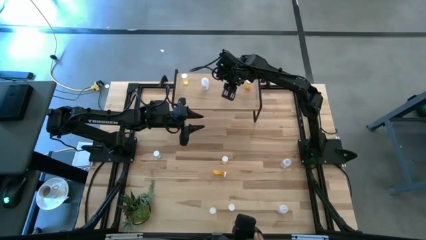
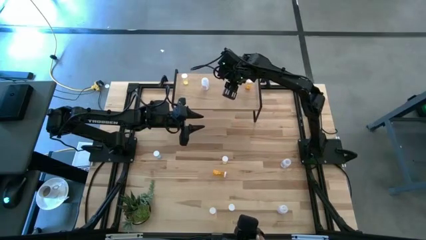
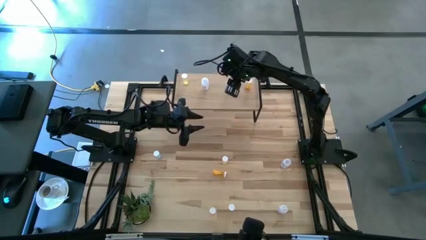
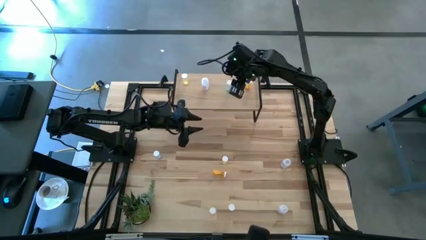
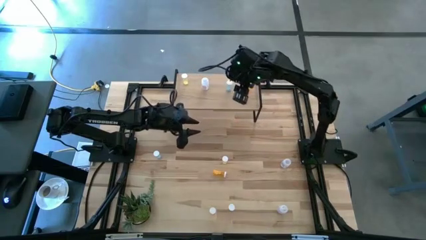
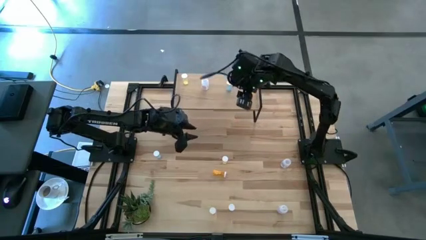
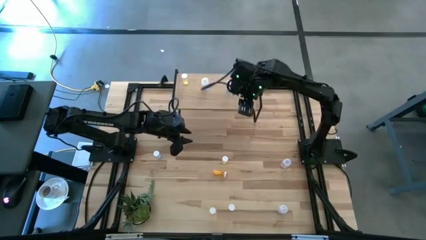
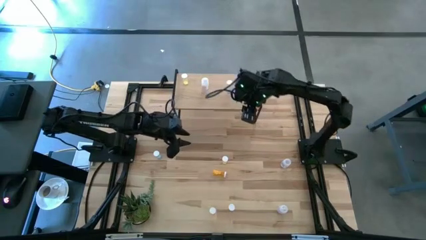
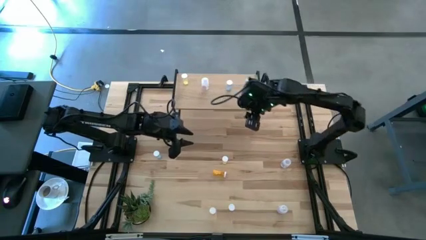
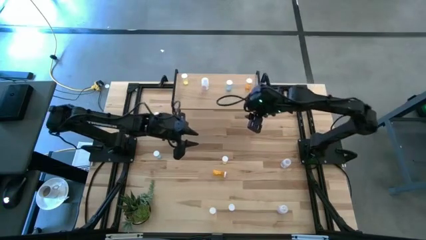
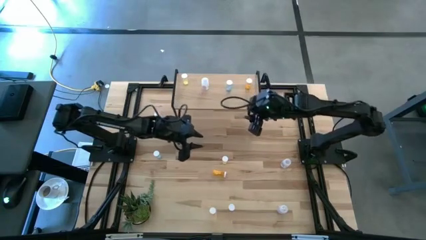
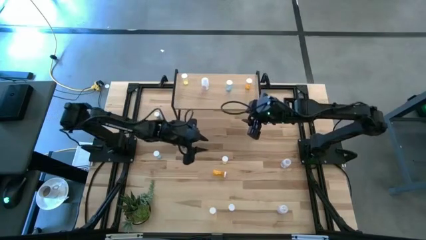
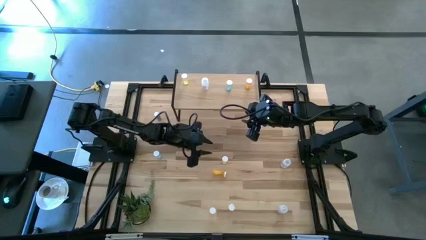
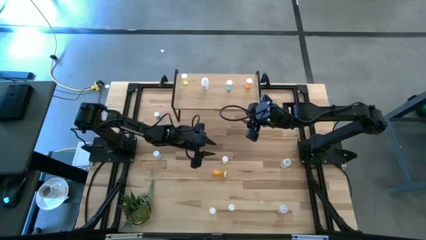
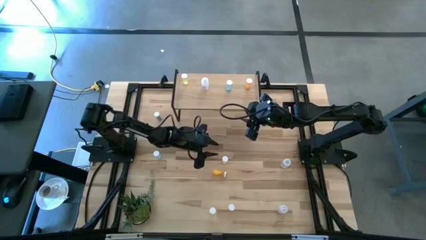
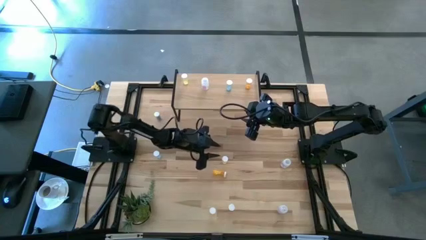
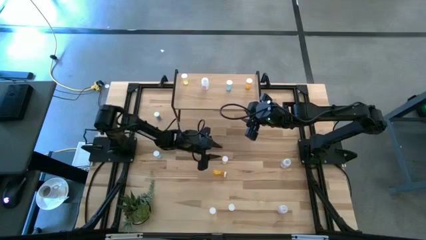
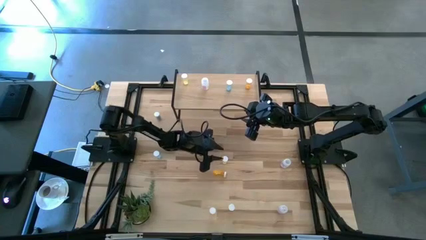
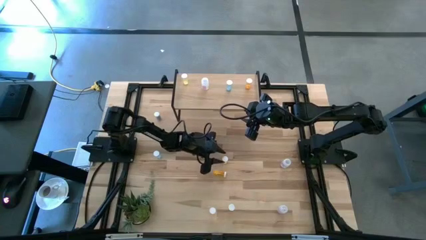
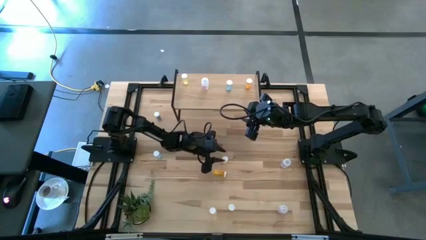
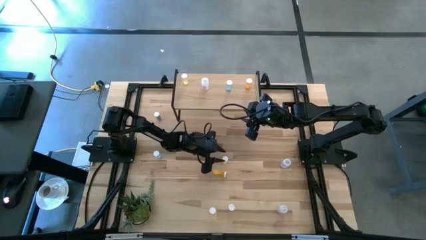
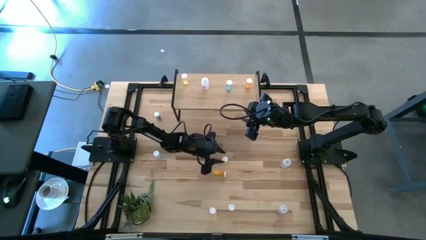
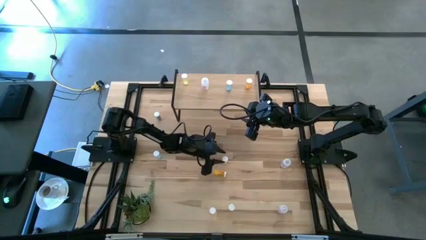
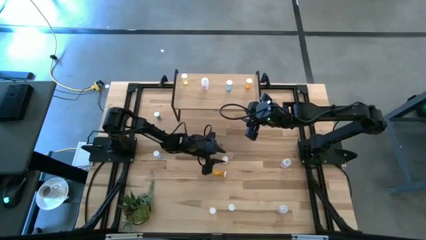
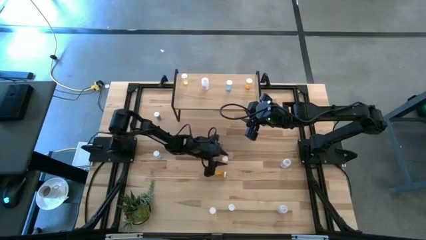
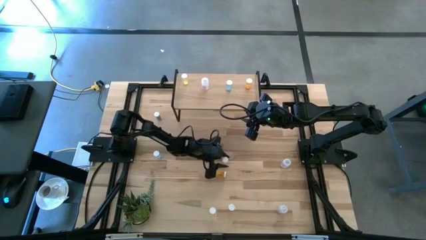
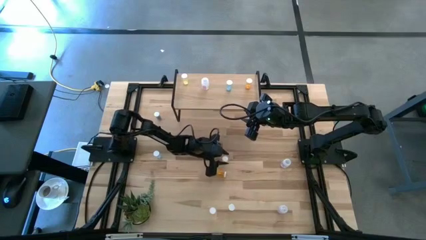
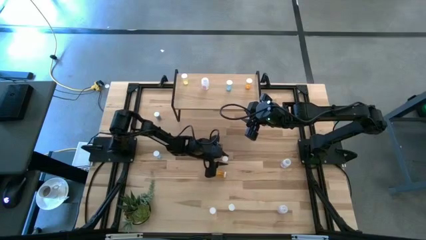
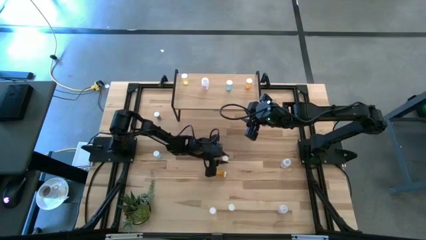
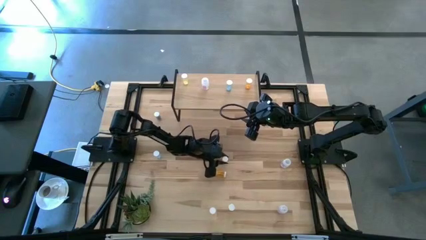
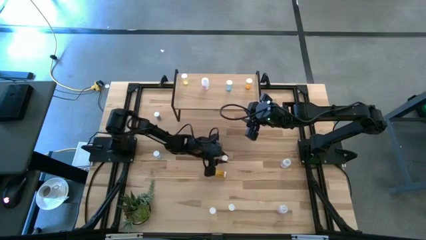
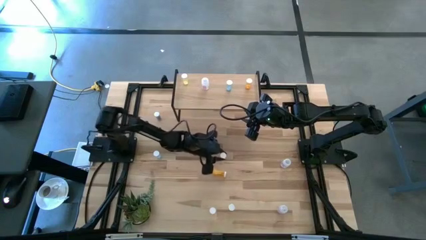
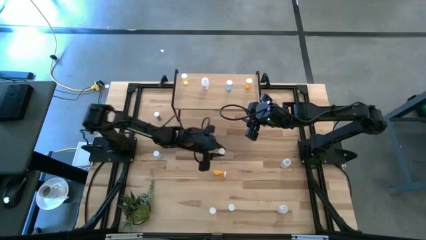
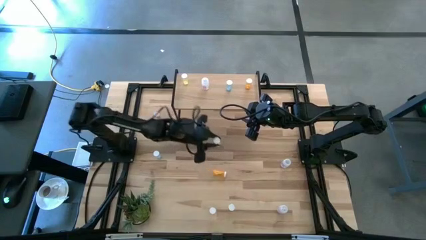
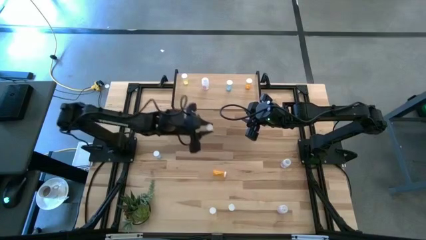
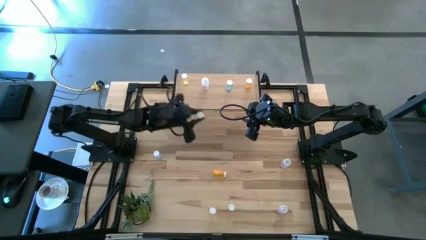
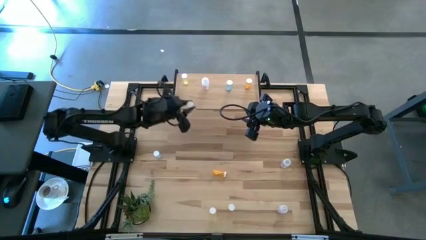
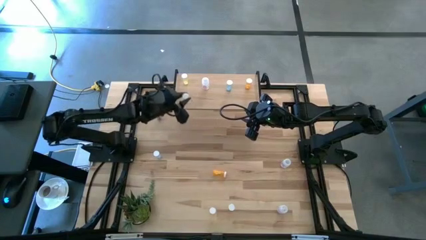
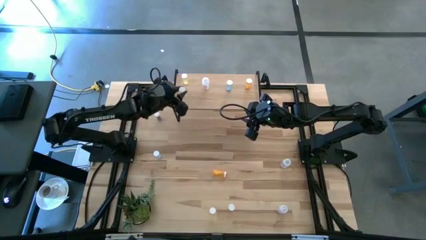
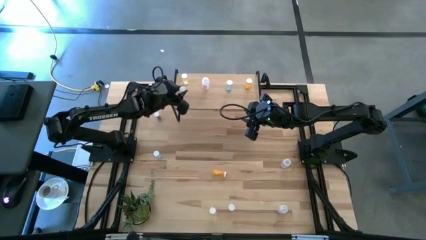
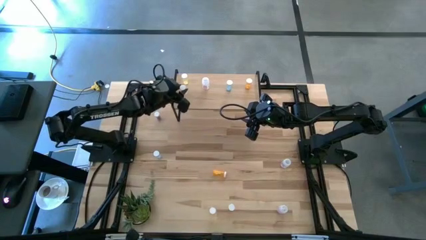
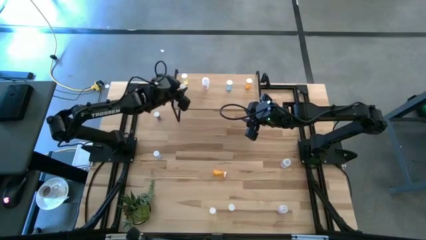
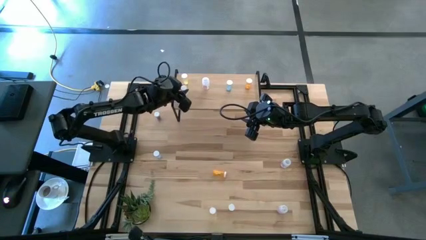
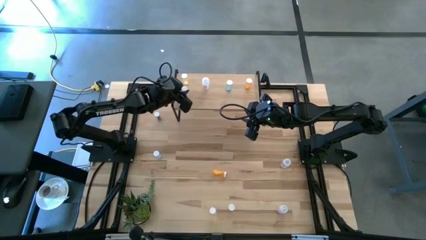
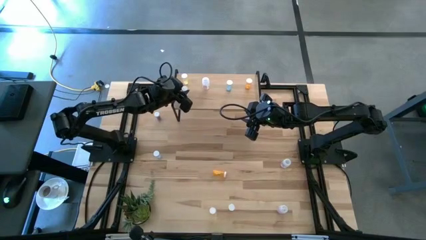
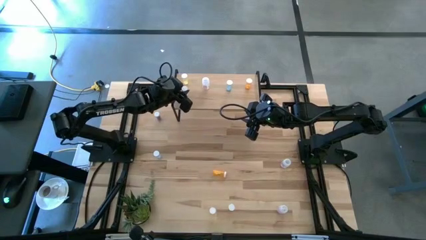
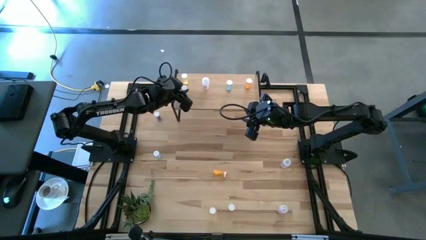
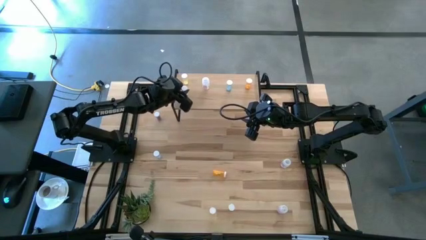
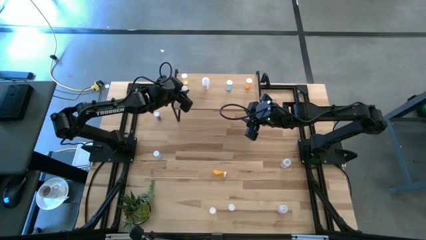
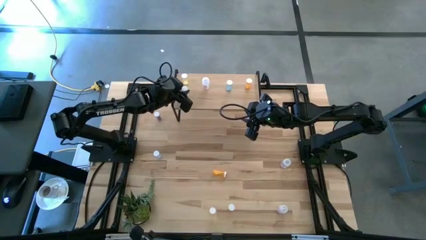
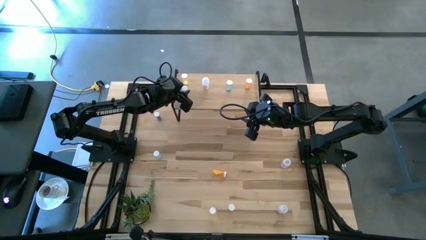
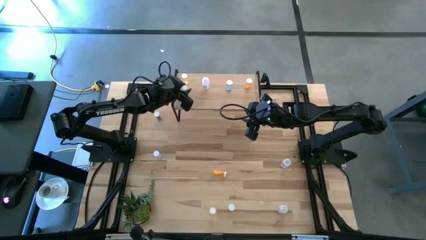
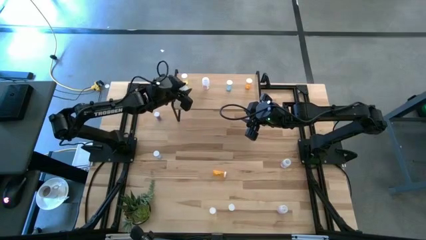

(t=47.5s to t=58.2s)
Task: Pick and place medicine bottles onto shelf by color
Put the top yellow pill bottle on the shelf aligned with the yellow pill bottle

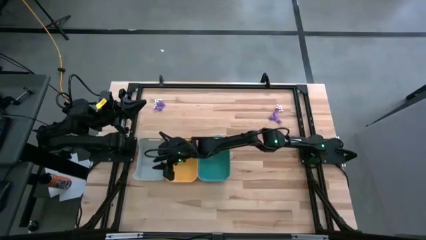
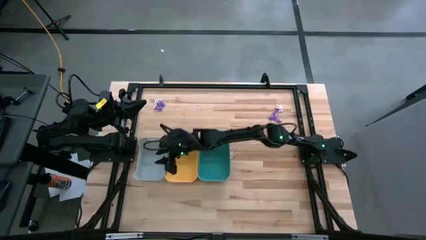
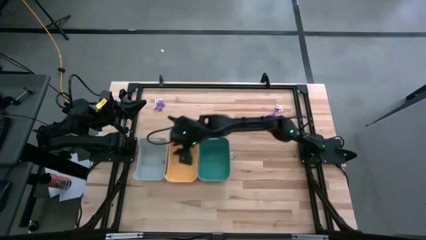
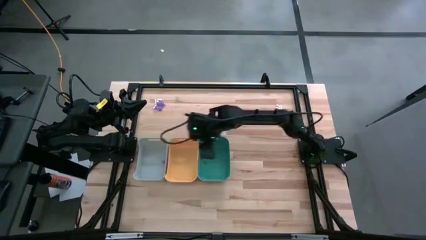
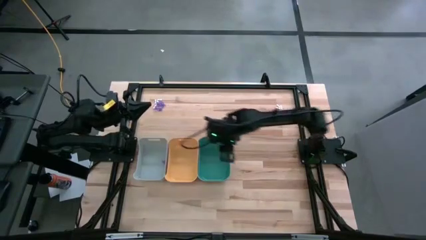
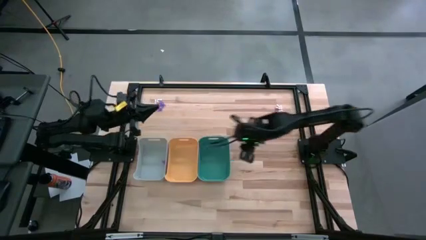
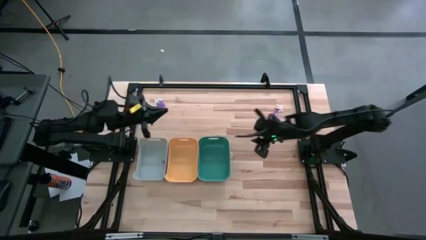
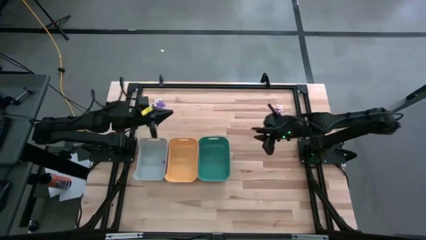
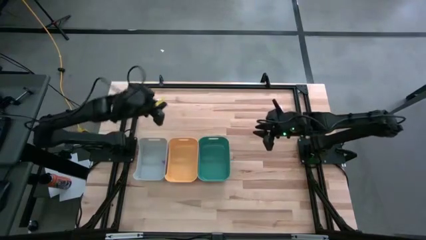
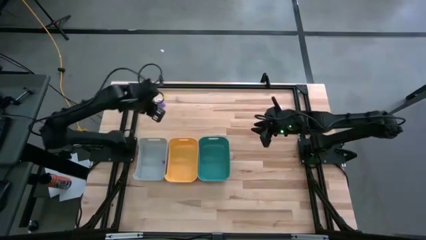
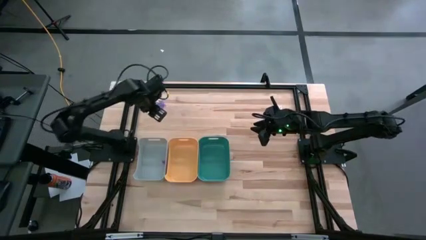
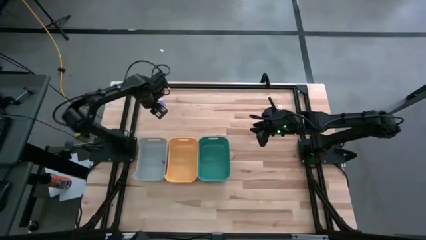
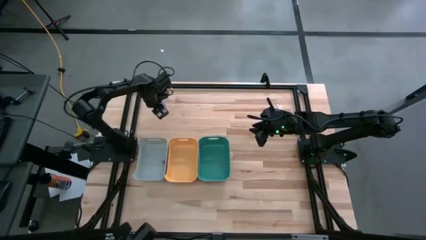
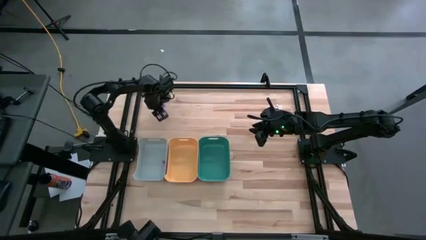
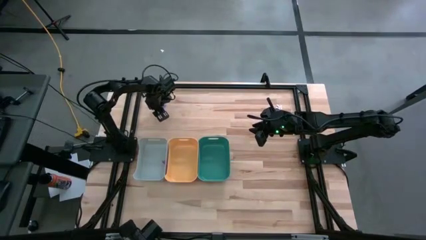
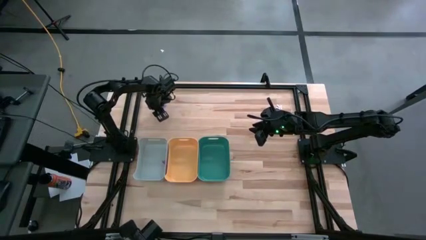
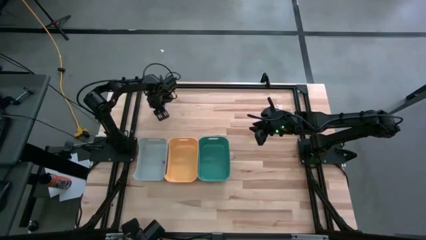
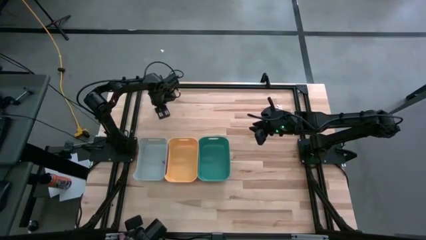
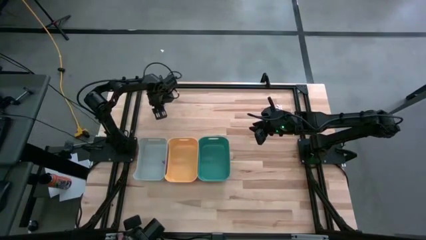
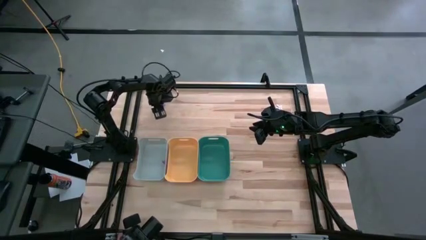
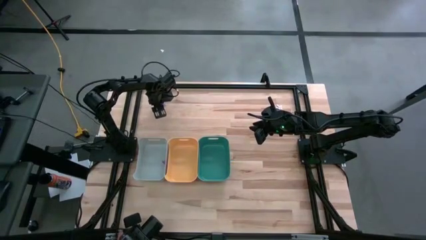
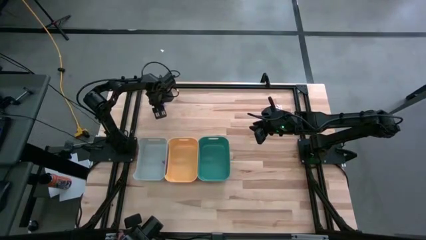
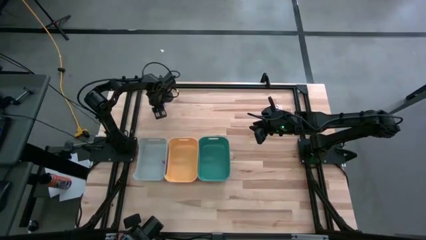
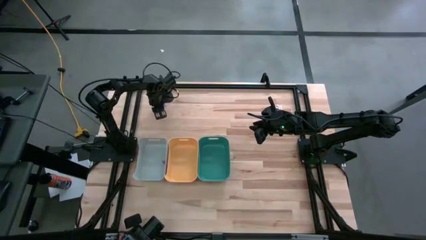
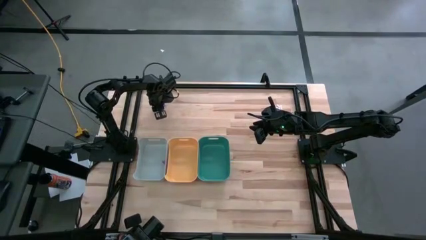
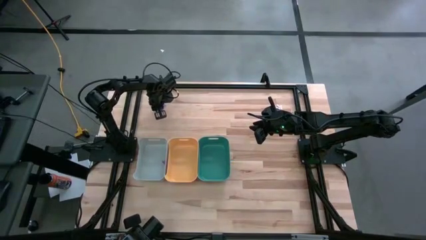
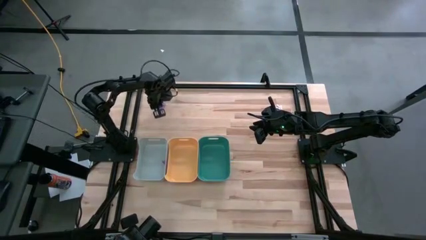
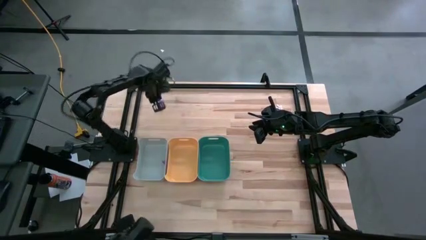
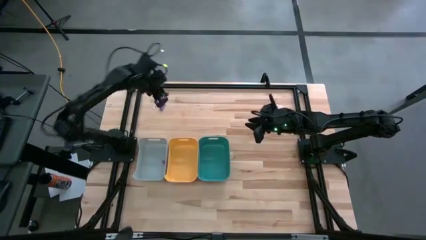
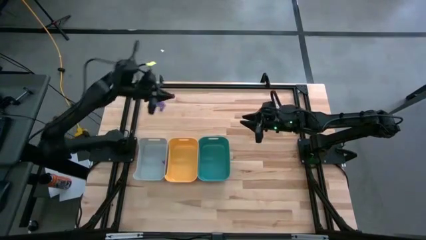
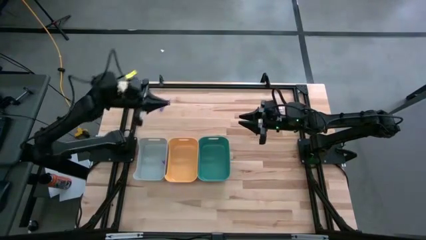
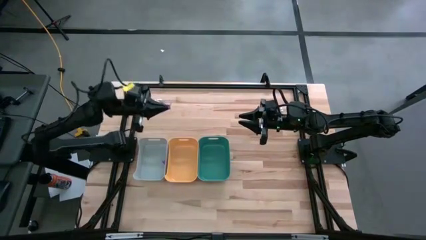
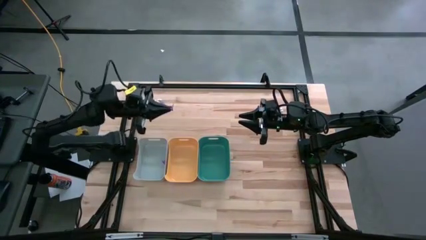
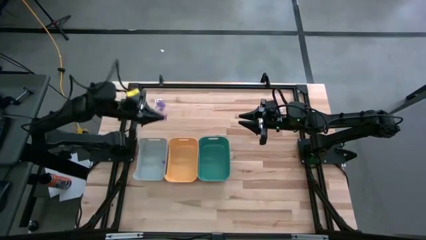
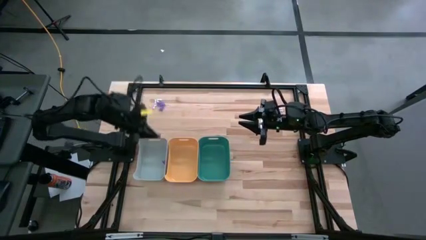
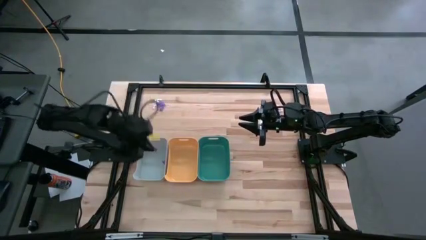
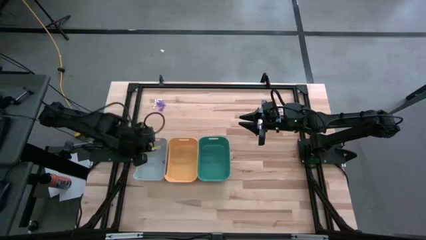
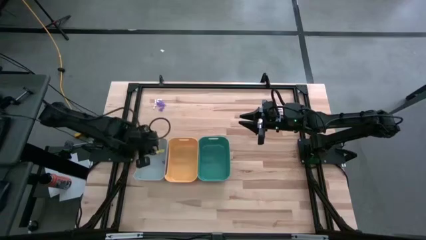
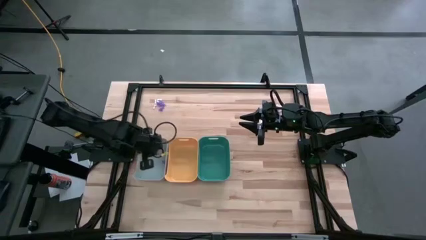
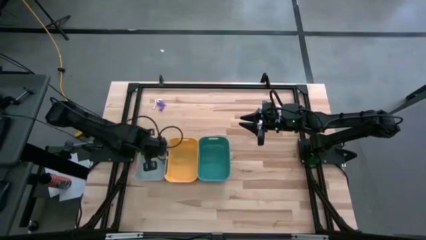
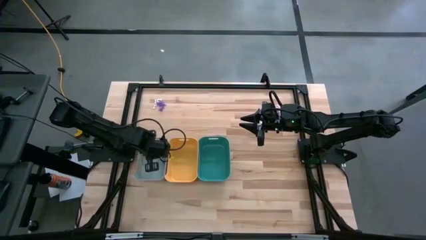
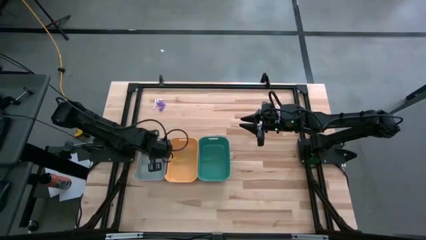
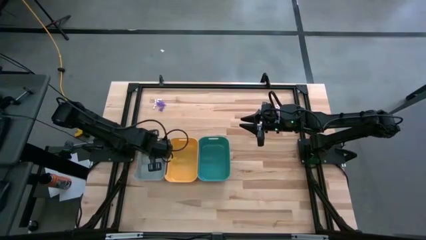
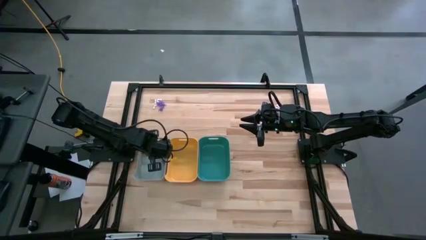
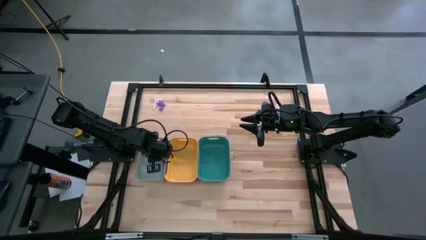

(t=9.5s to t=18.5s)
Task: Sort Halloween decoration
Put the purple witch hat toy into the white bin
